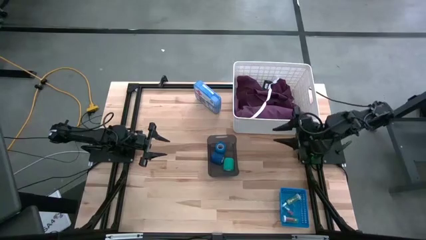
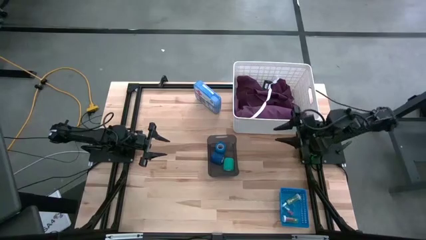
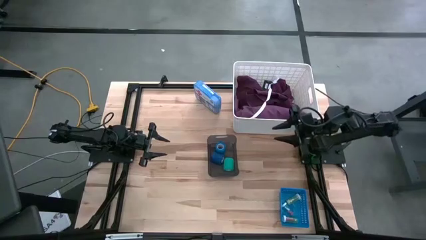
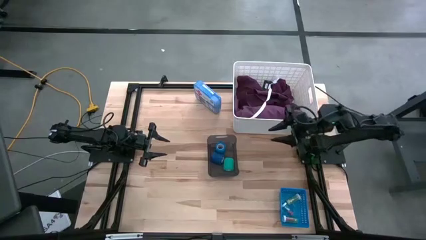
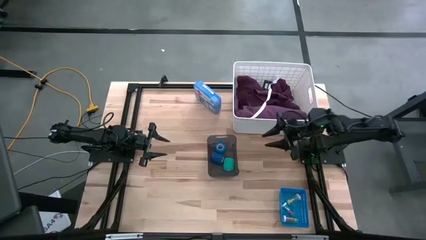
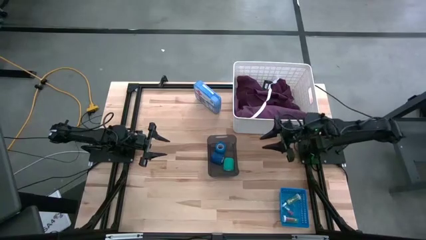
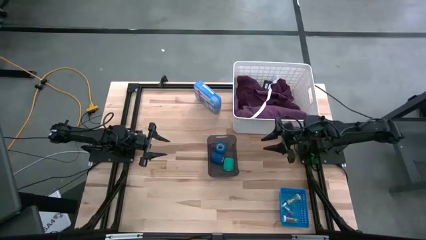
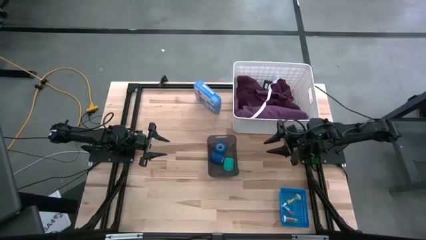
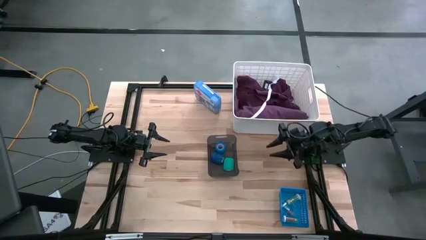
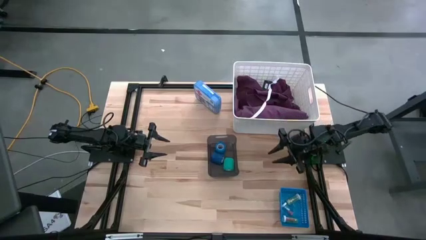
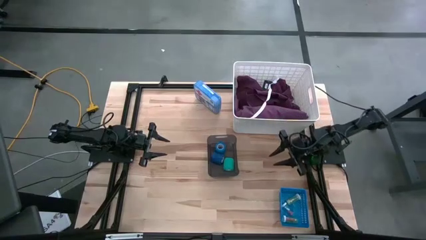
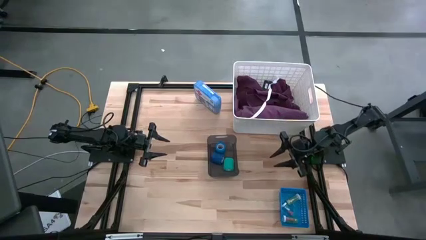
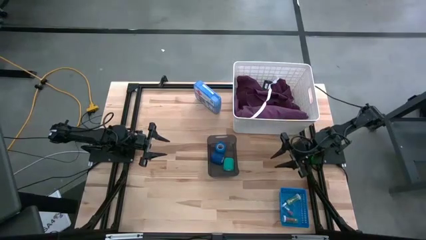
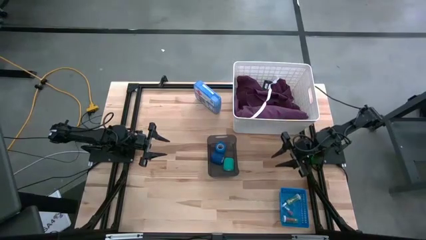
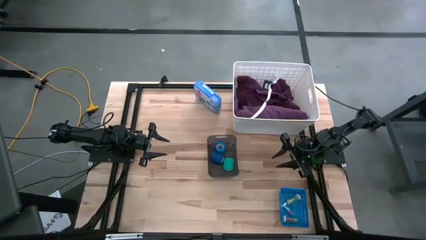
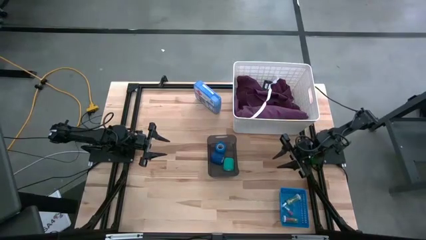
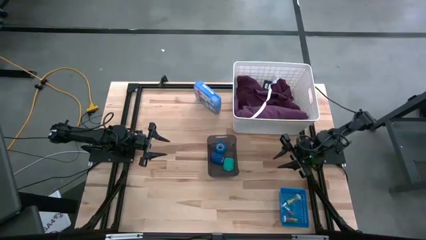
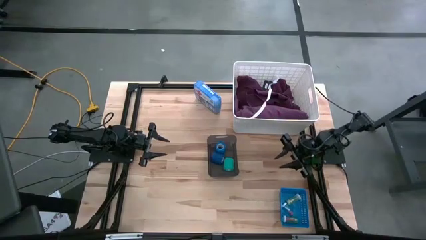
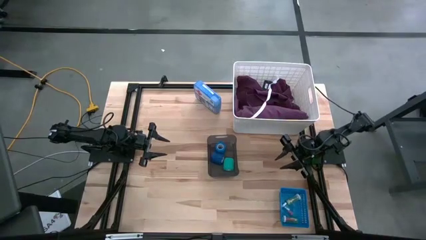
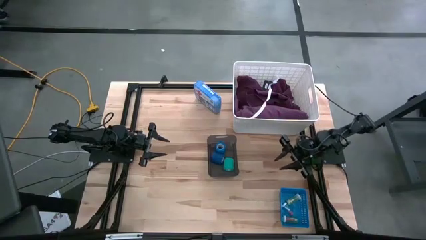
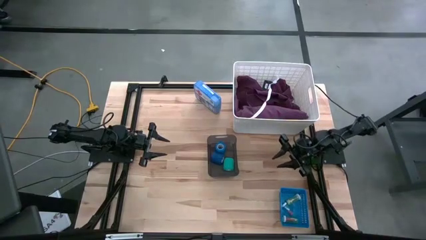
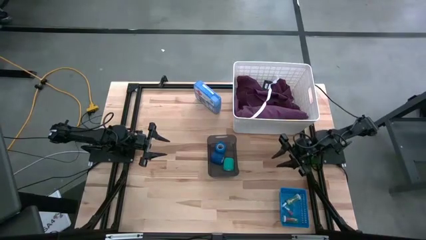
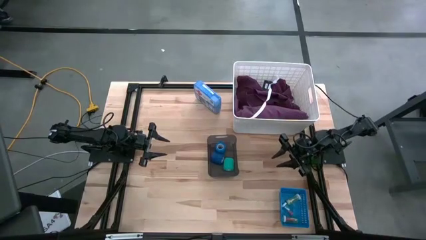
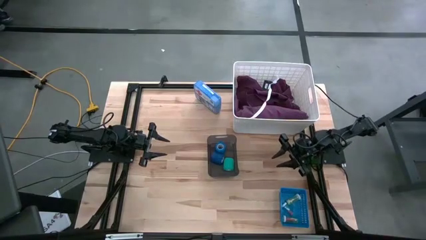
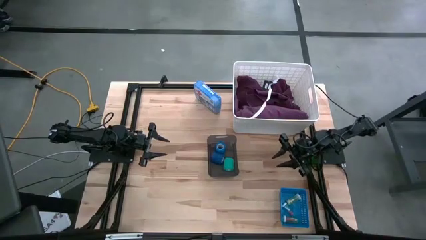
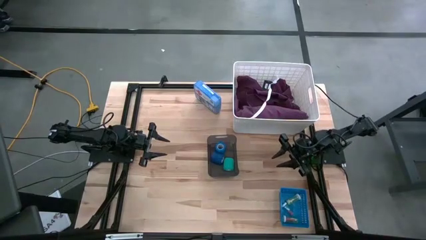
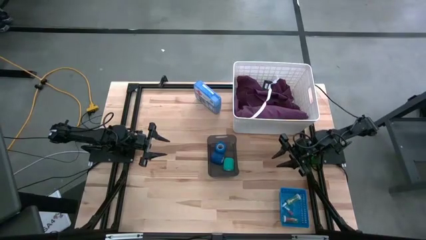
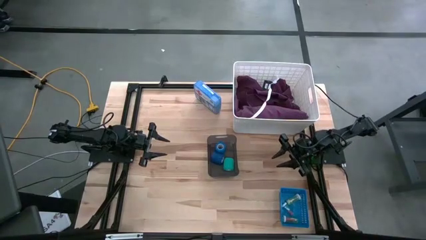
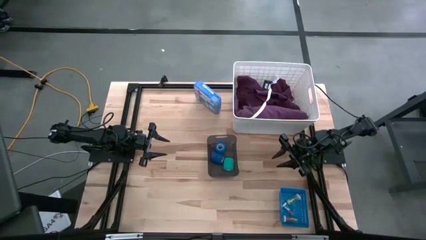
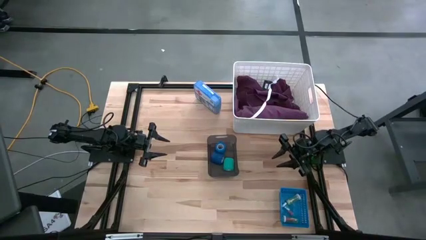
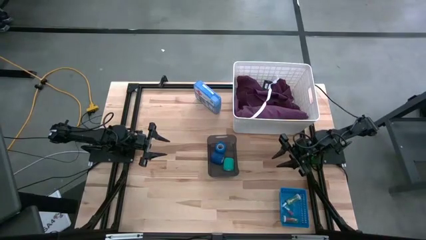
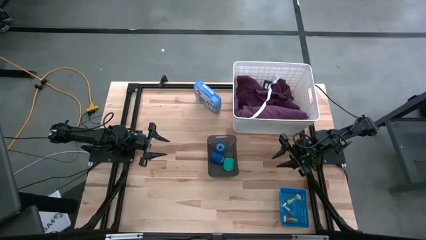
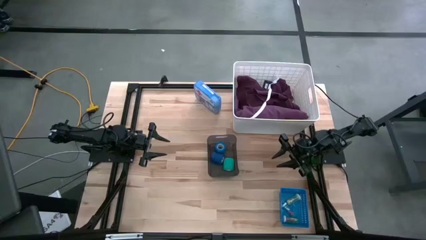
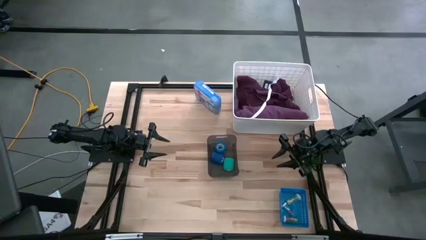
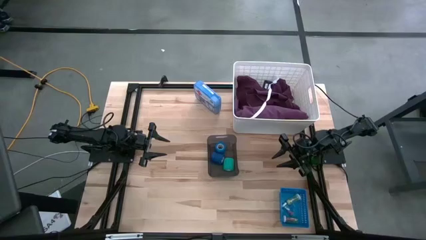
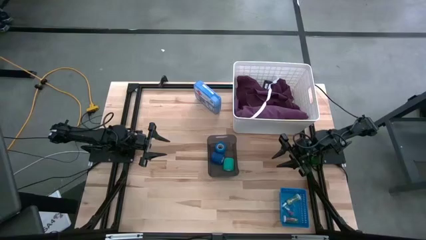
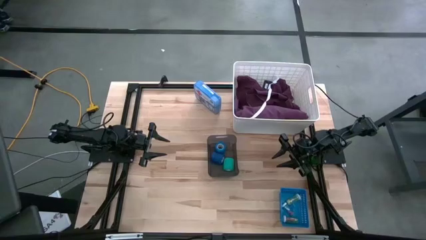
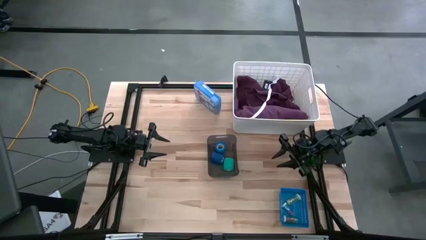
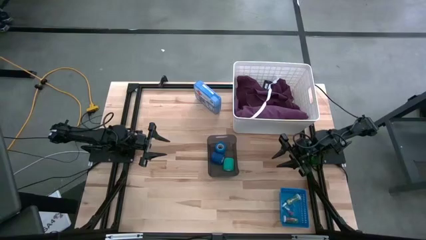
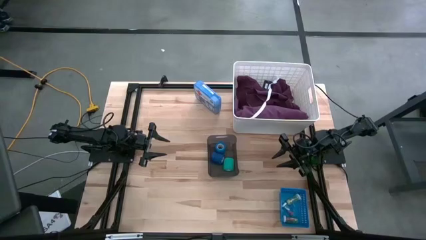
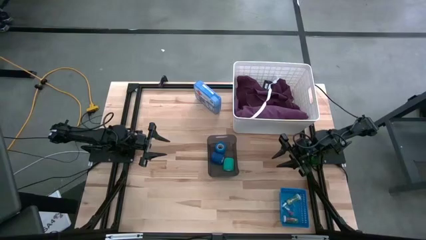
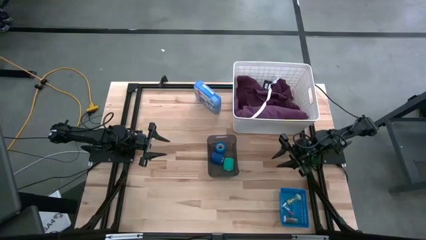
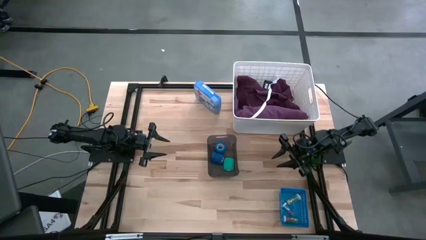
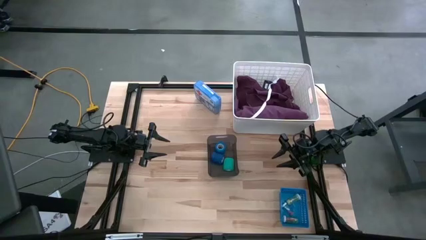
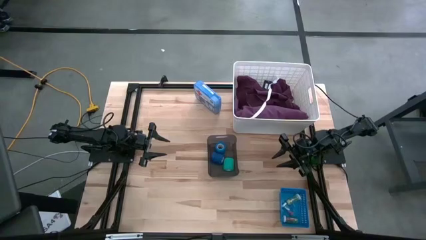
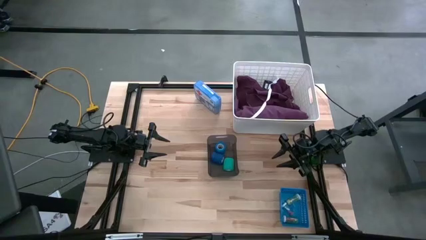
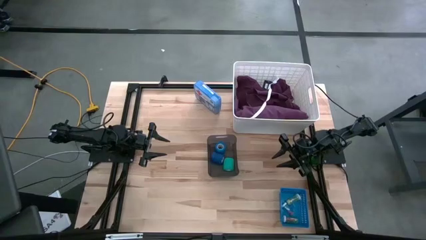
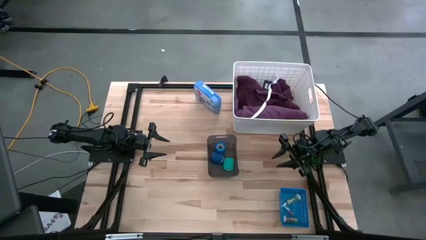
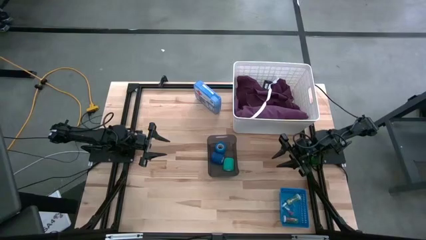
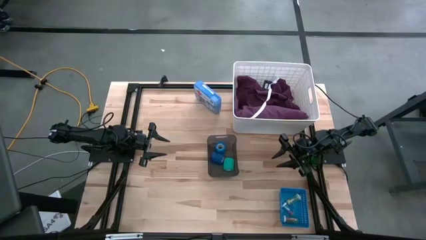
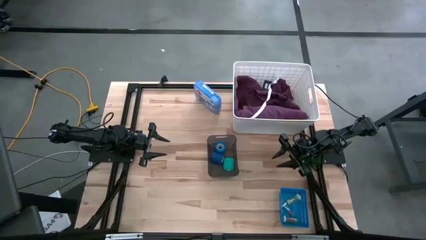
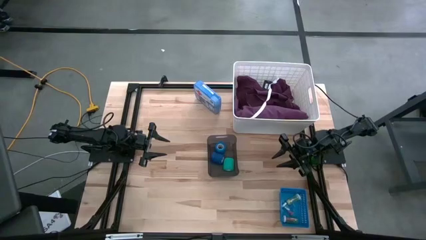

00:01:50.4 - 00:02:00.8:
Task: Pick & Place Medicine items
Return to Home Position
